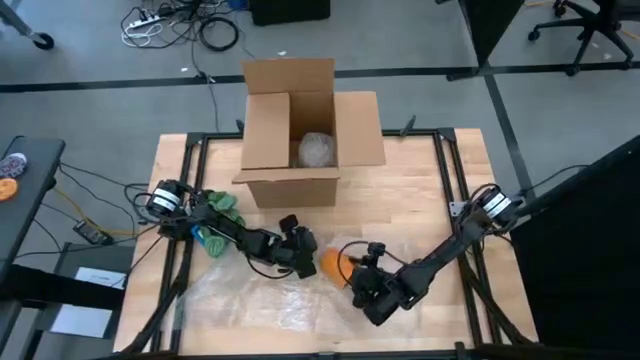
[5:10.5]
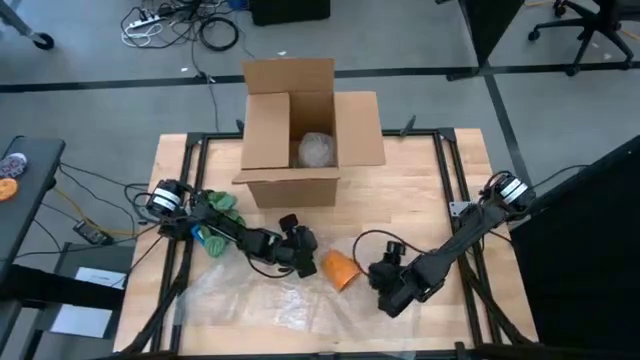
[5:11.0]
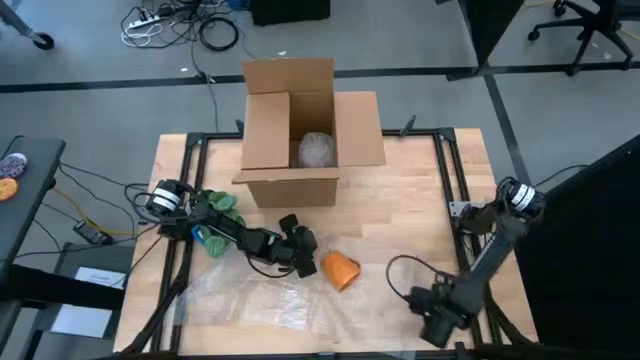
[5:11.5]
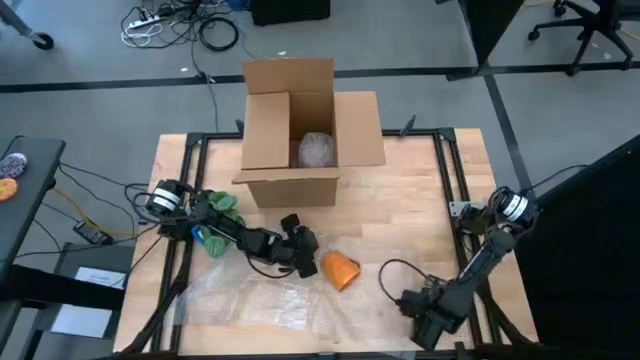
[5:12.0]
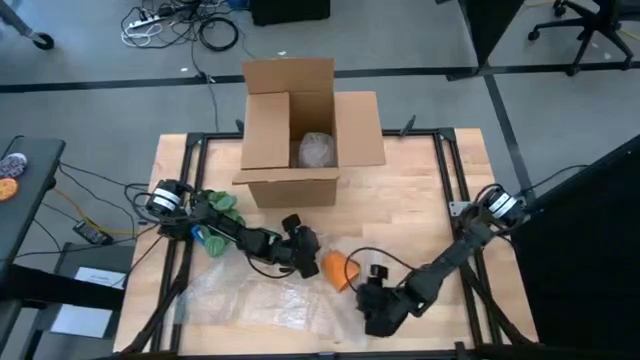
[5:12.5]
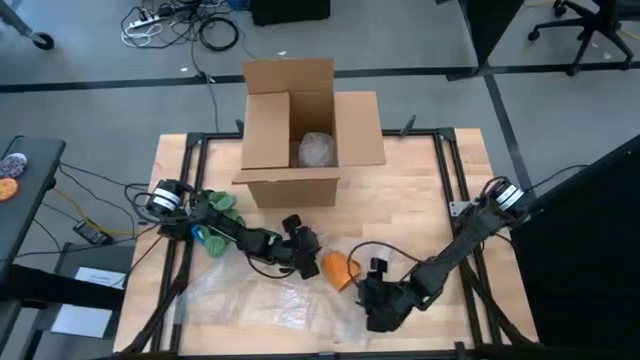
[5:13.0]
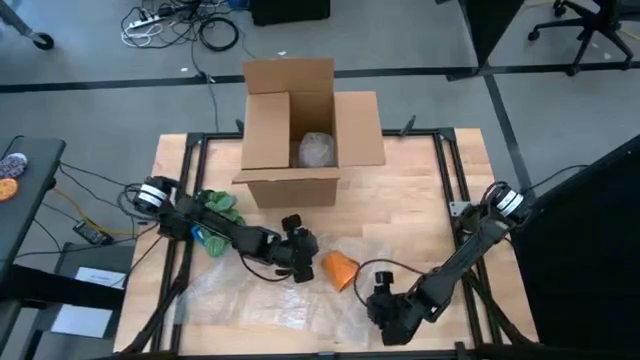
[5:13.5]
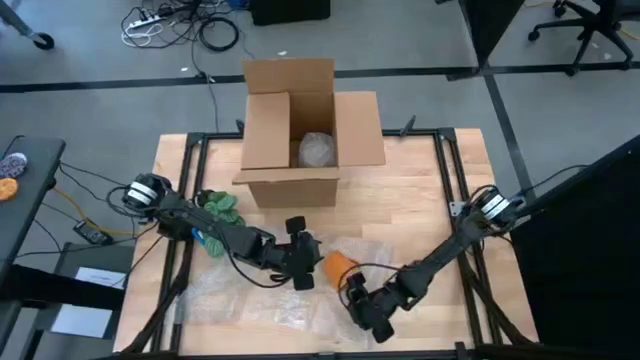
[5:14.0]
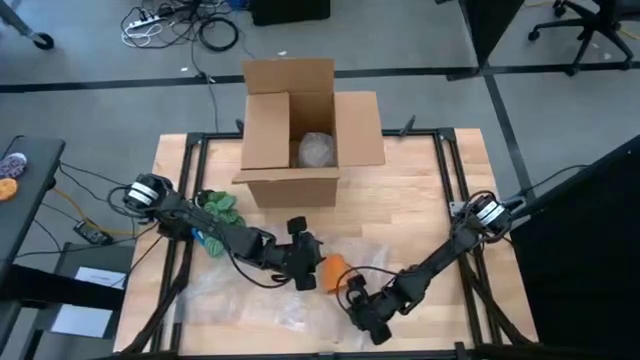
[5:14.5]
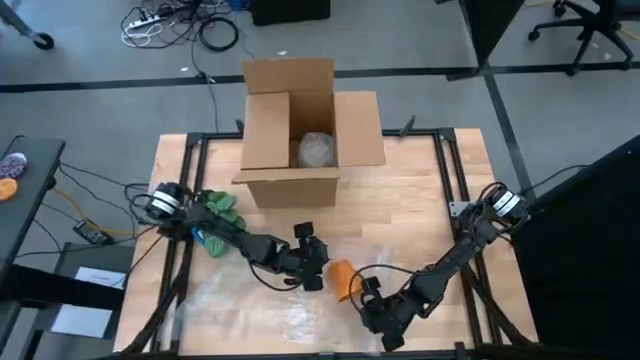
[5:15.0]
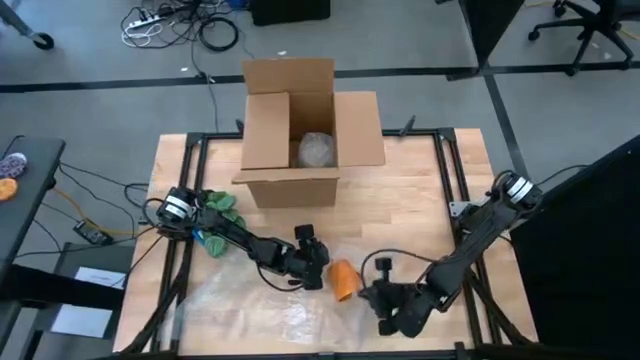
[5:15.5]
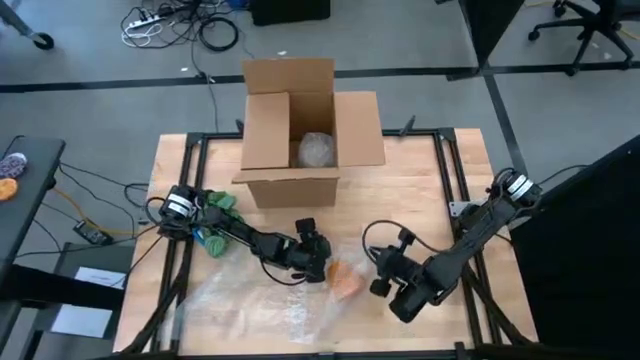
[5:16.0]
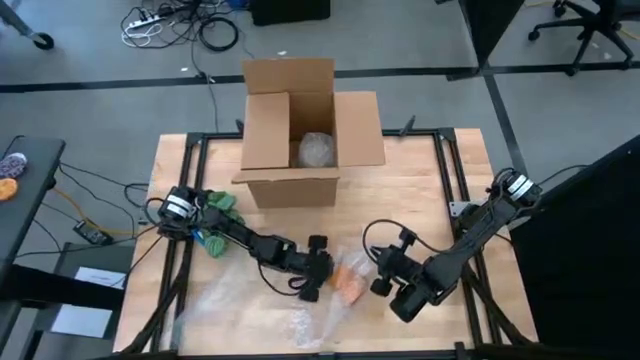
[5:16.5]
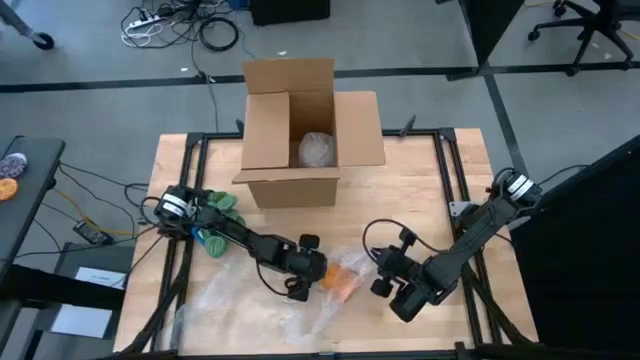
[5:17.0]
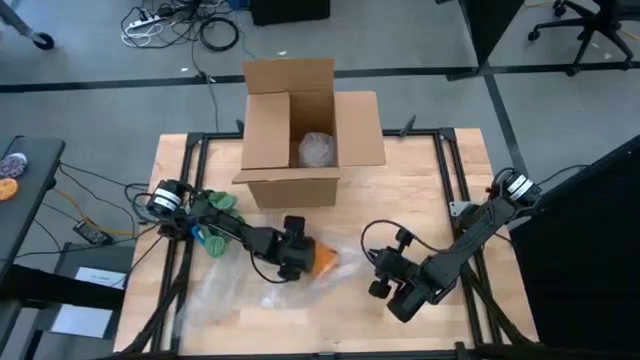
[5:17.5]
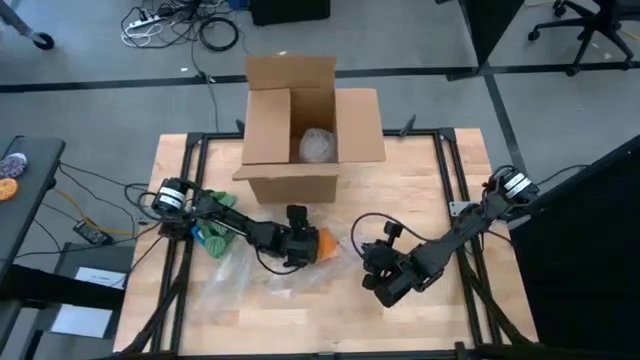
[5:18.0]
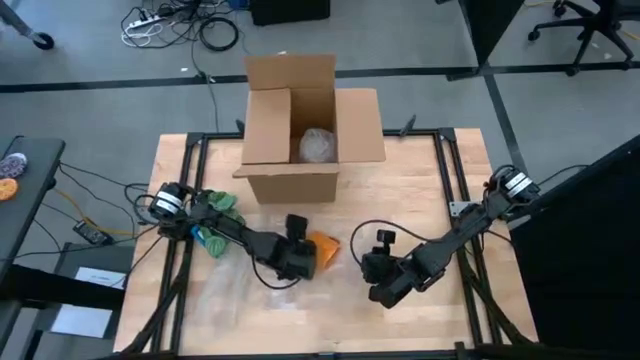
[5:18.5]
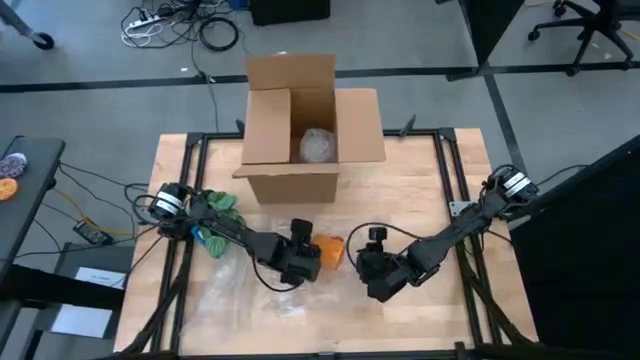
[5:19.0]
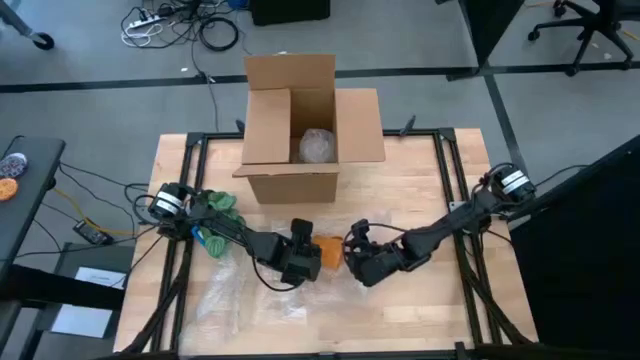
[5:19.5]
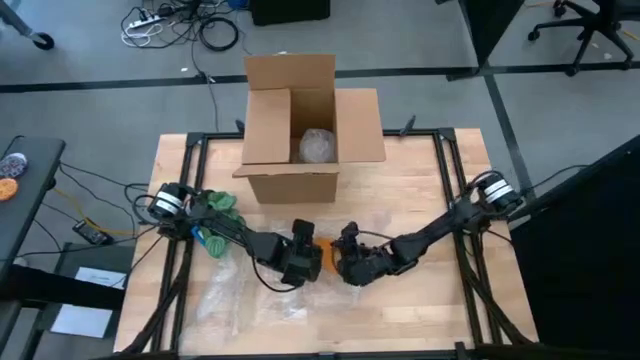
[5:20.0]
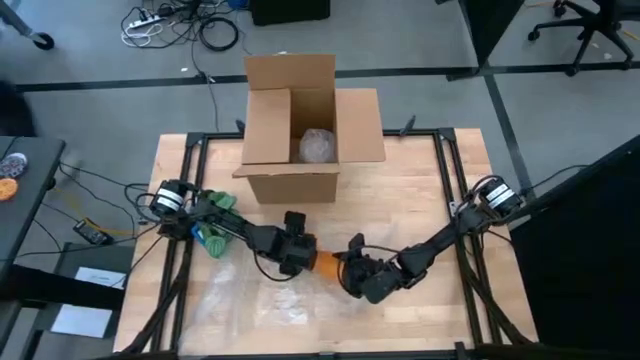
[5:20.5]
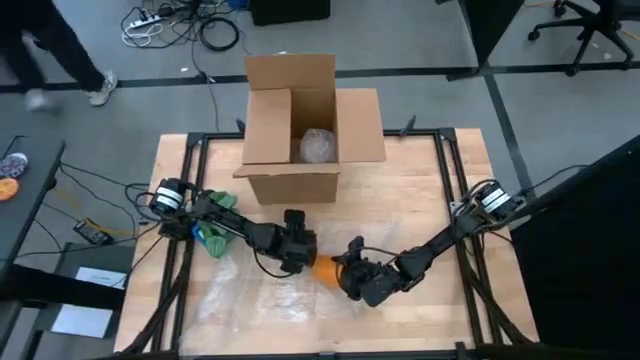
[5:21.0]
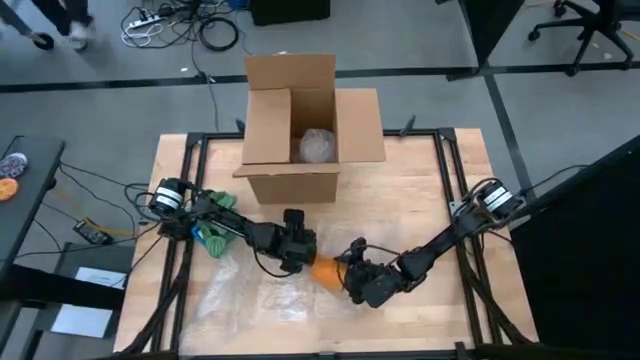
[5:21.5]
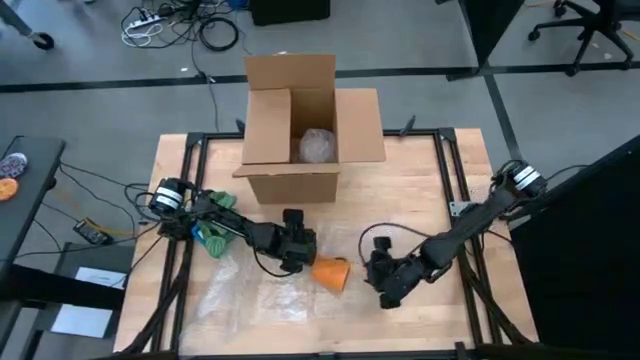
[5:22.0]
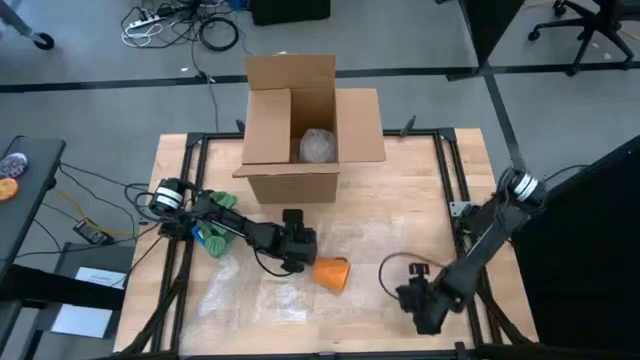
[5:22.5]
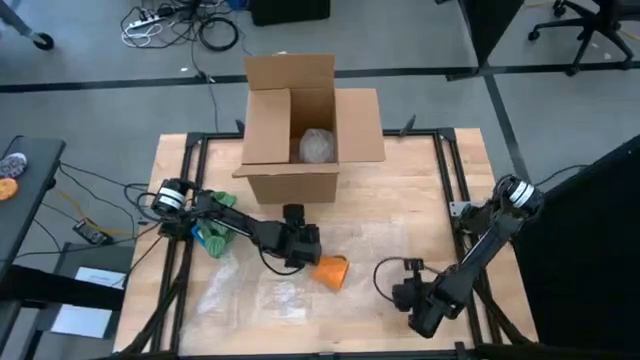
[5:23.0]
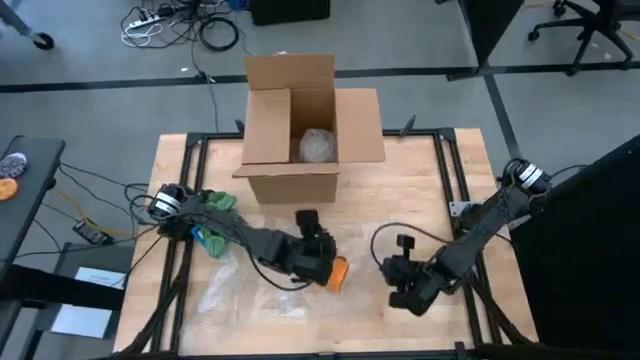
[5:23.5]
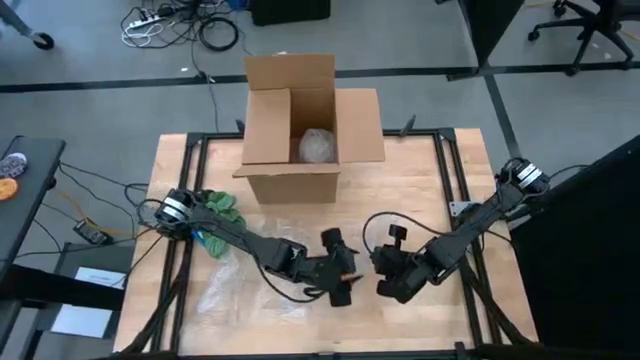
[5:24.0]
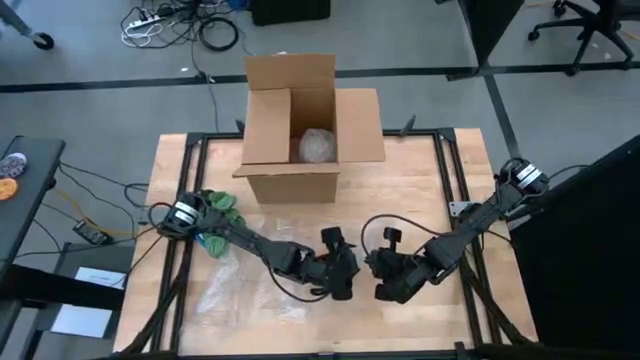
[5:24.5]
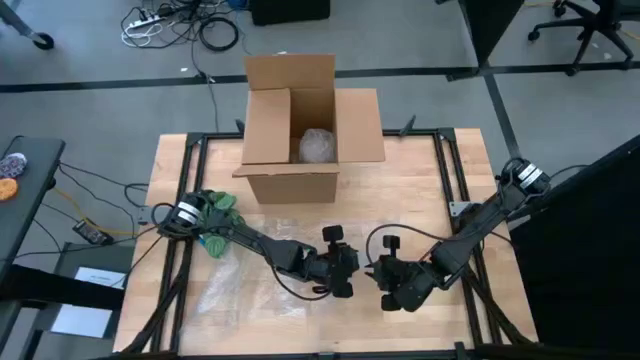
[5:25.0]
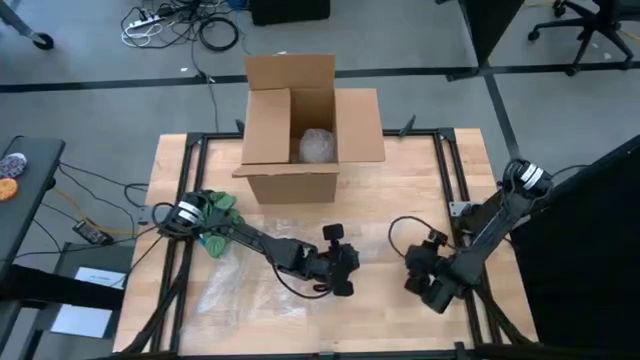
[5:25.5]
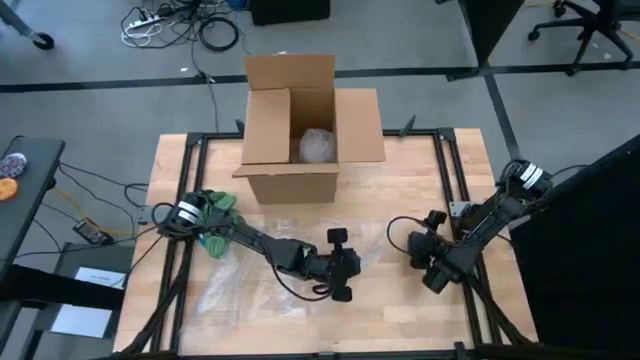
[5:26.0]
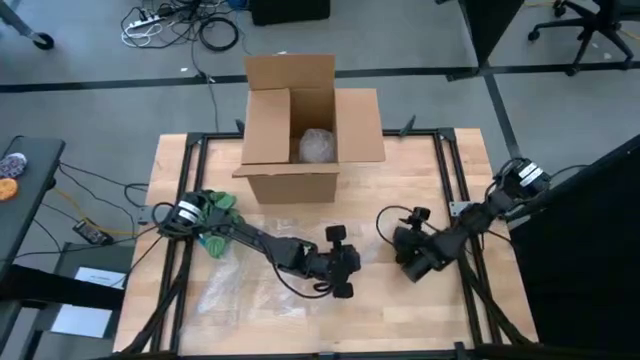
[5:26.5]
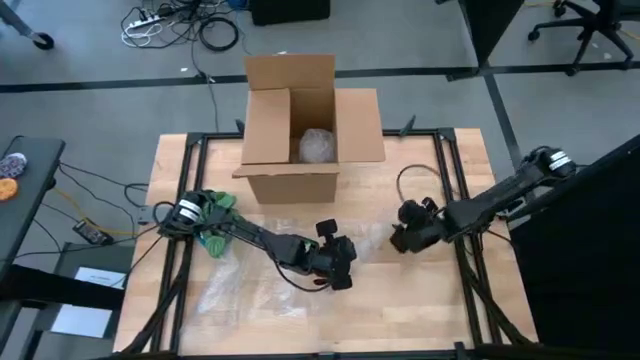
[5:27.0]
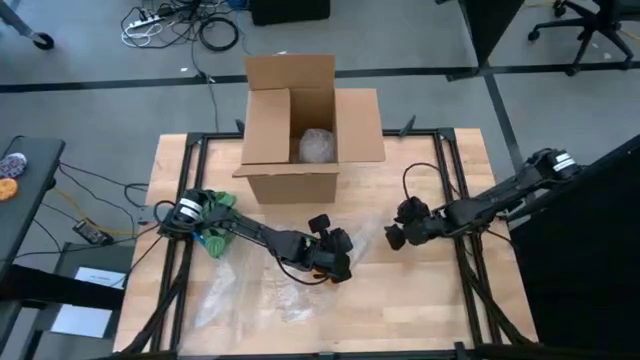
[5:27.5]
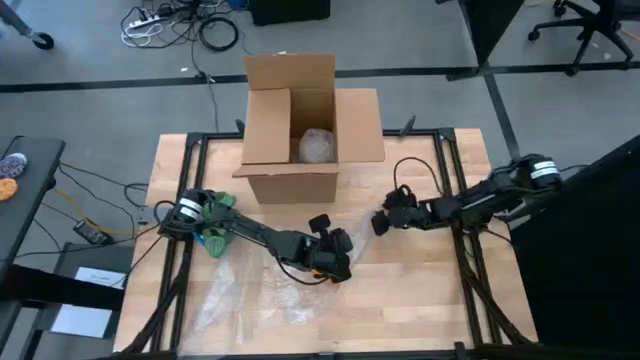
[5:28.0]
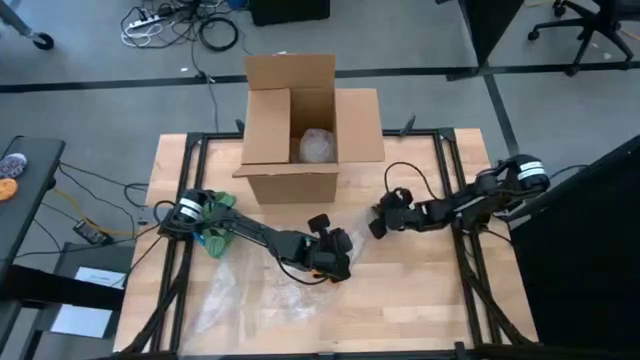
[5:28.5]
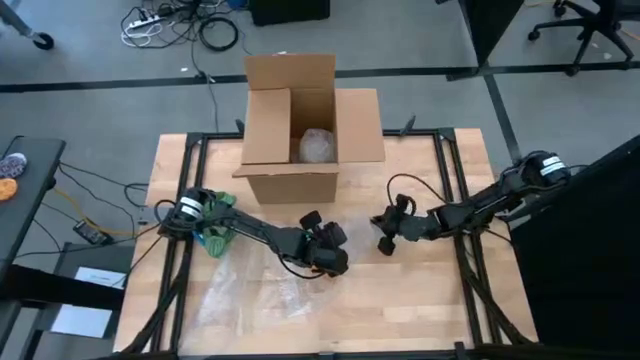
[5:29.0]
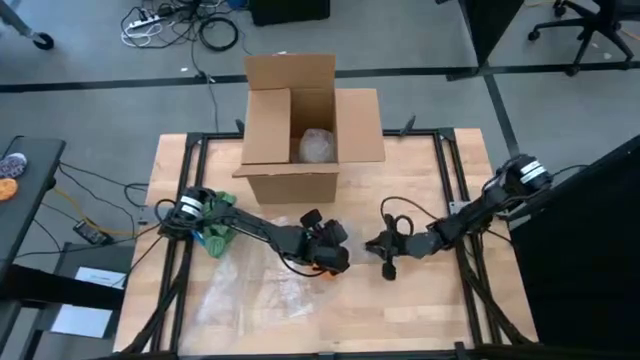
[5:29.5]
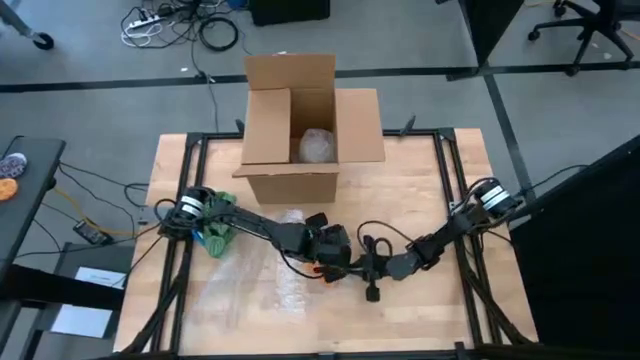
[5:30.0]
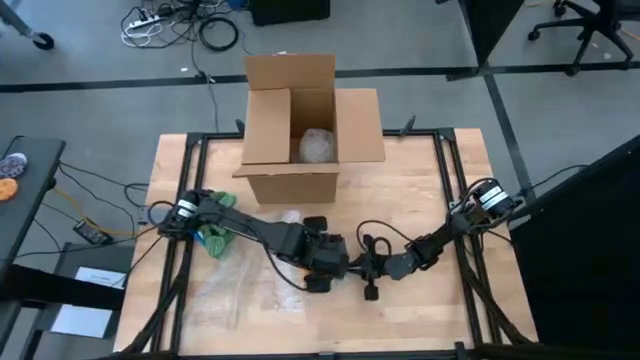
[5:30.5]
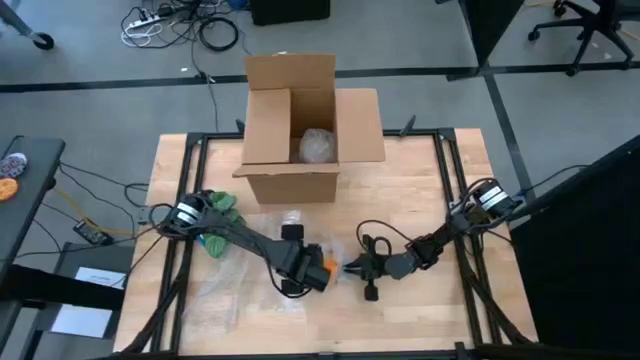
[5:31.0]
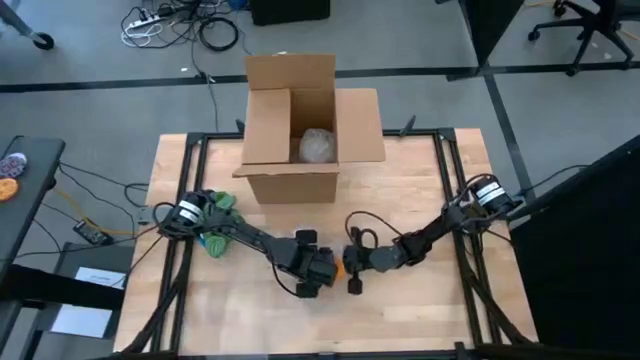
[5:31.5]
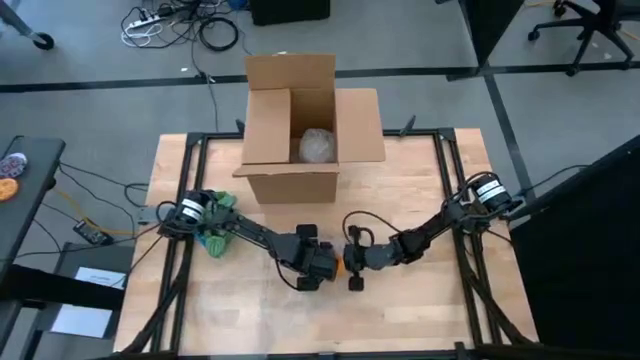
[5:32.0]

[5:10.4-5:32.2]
Task: wrap mug
Wrap the orange mug with the bubble wrap
